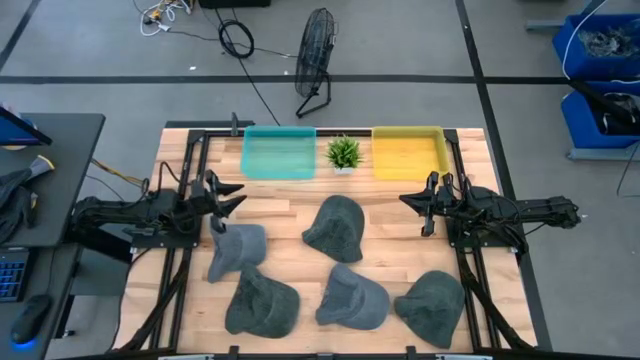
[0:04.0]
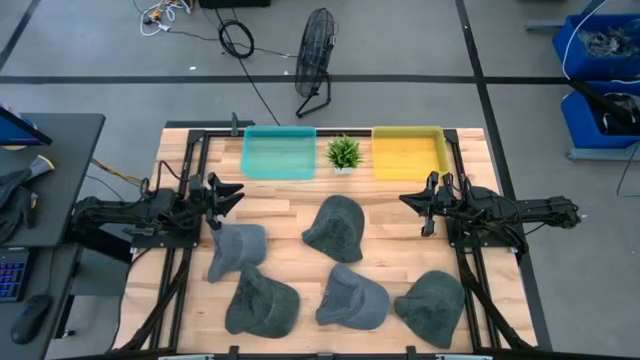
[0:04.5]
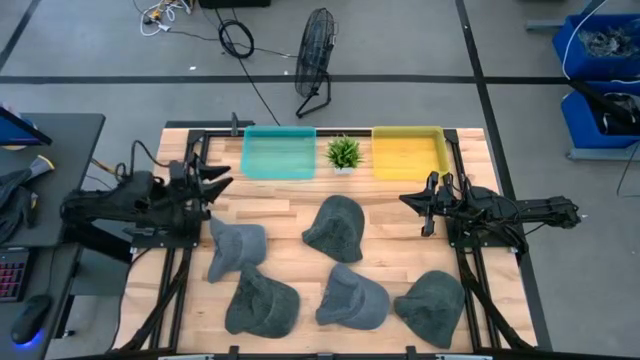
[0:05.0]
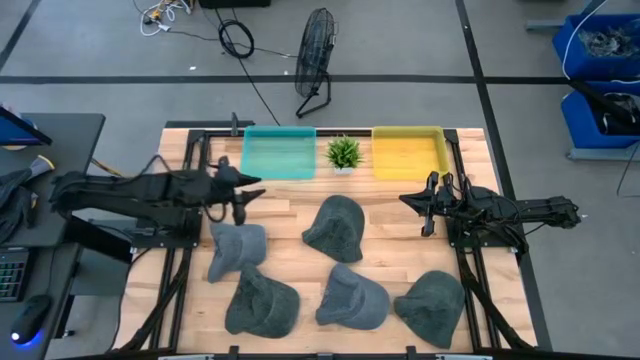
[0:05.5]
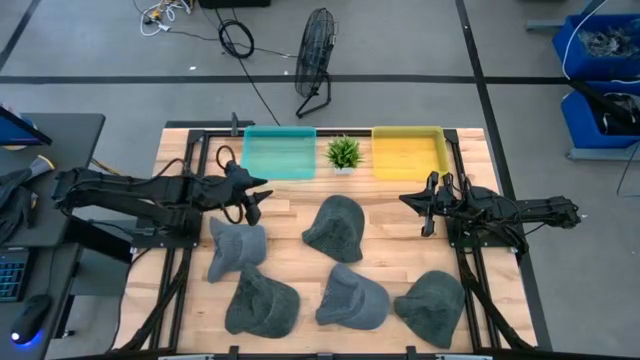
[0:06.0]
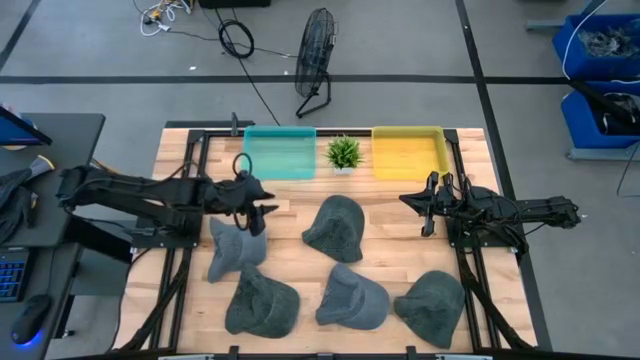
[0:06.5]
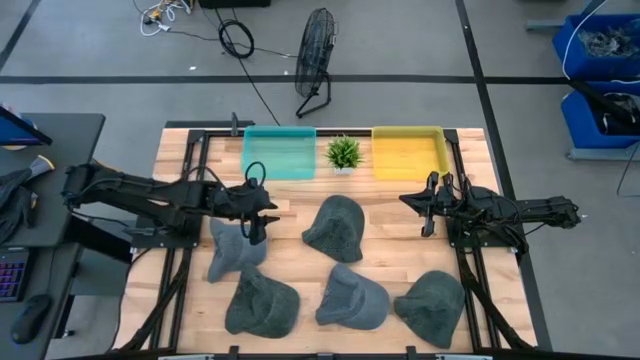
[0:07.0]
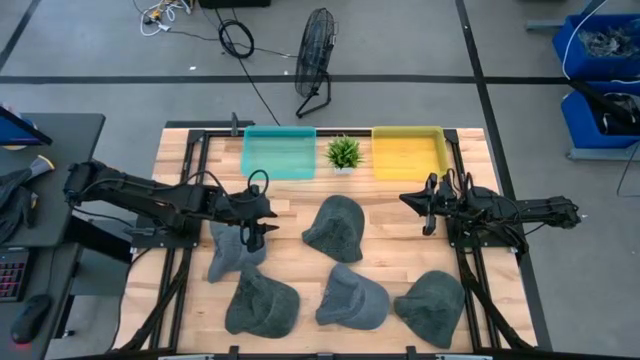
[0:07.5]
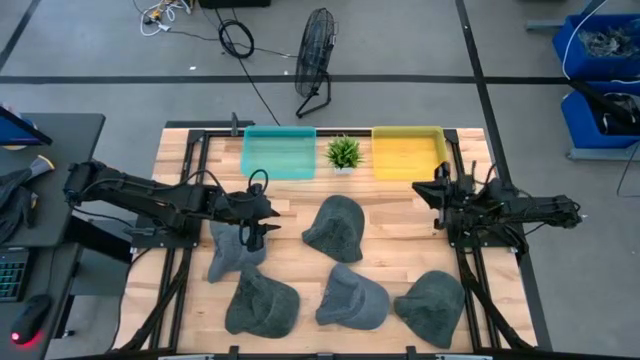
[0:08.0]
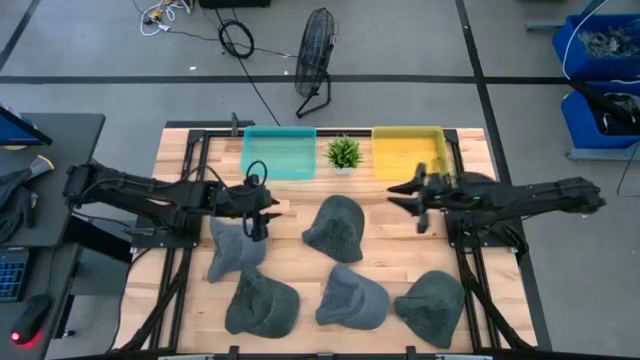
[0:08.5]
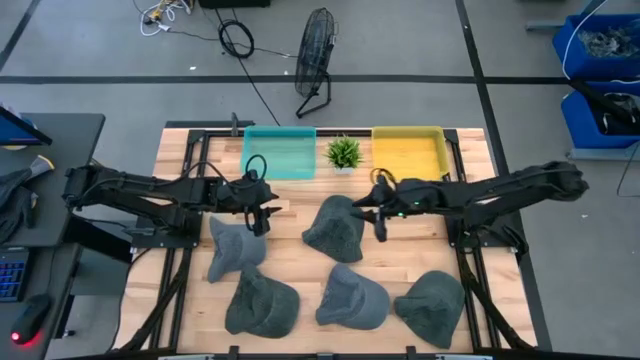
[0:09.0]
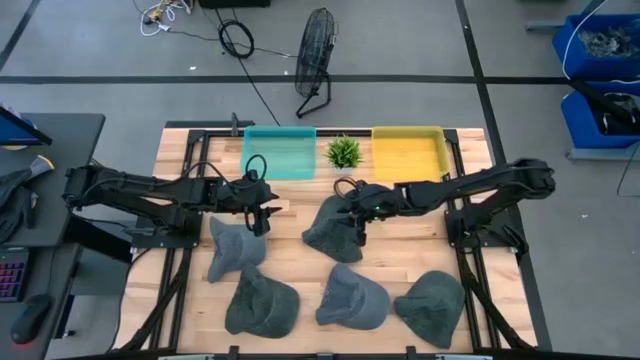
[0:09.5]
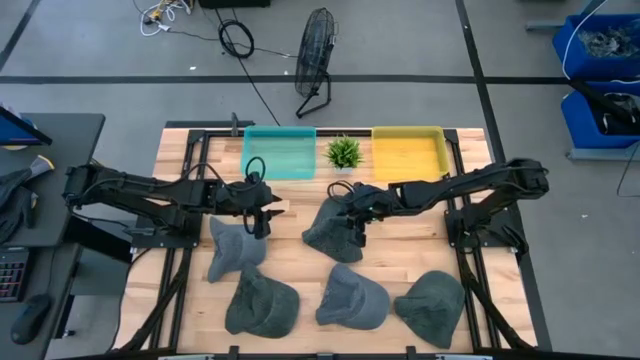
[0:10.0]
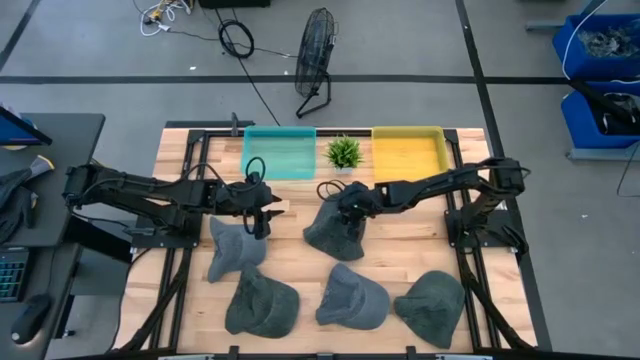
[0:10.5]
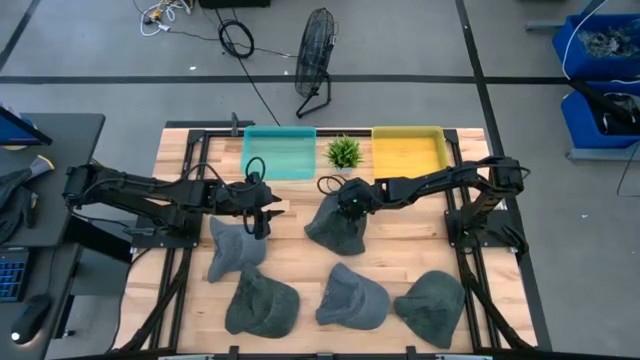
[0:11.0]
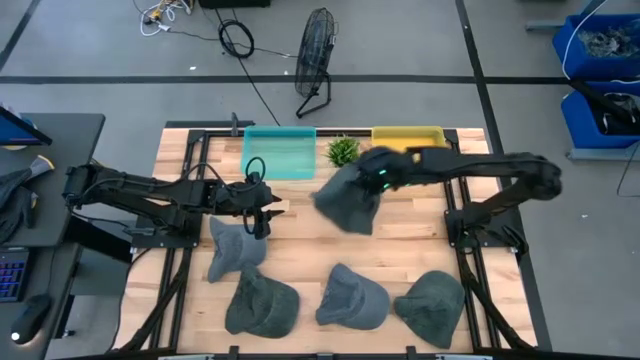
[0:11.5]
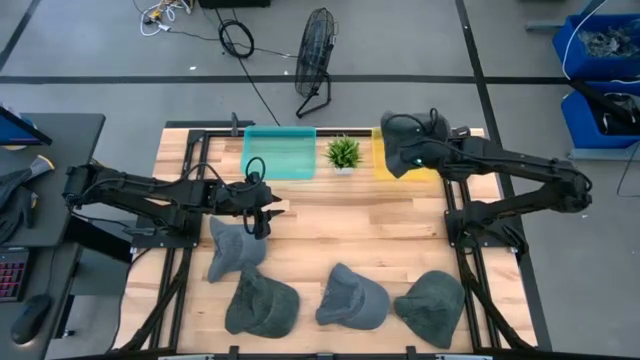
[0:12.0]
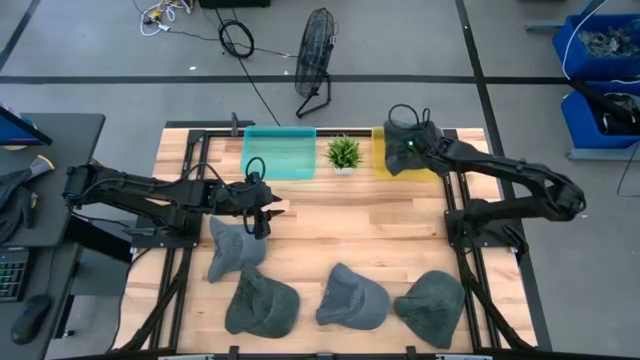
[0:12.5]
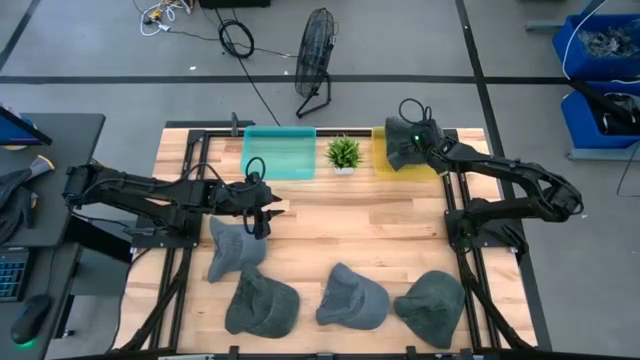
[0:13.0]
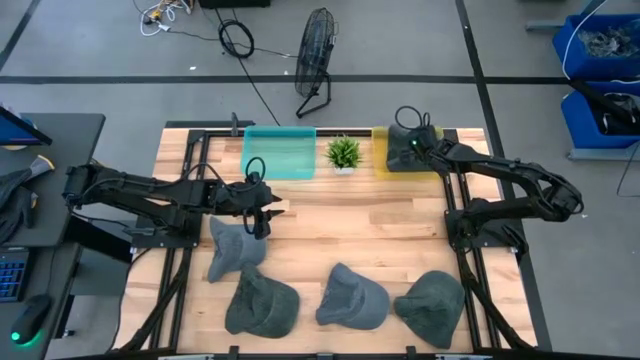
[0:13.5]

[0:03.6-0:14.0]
Task: Pick & Place hat
Put the top black cap into the yellow bin

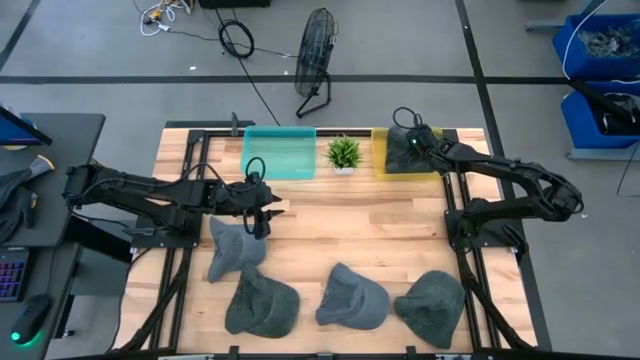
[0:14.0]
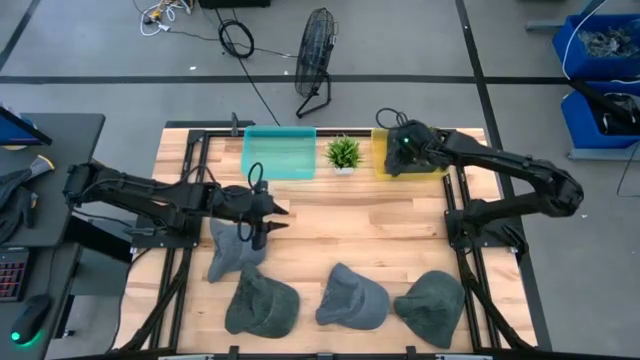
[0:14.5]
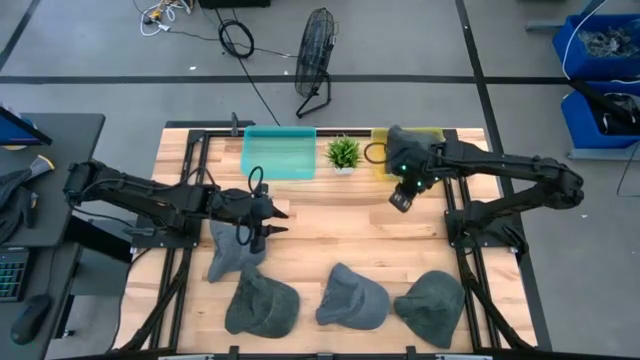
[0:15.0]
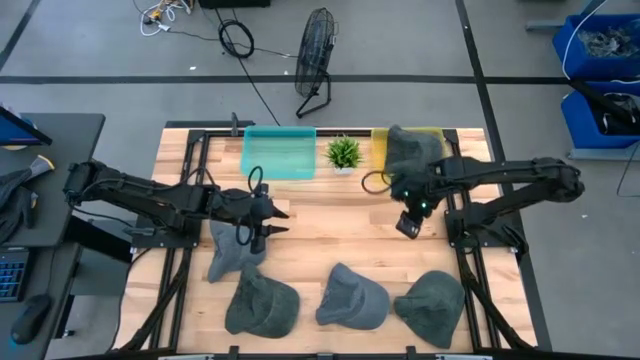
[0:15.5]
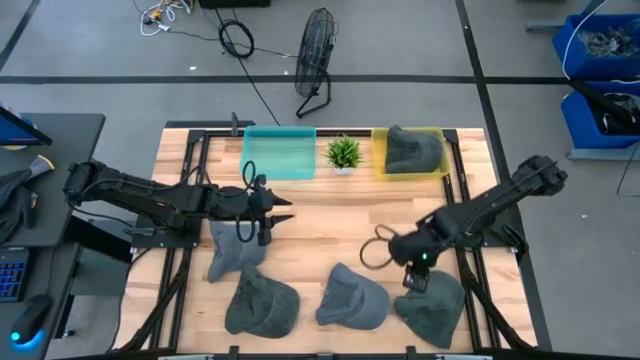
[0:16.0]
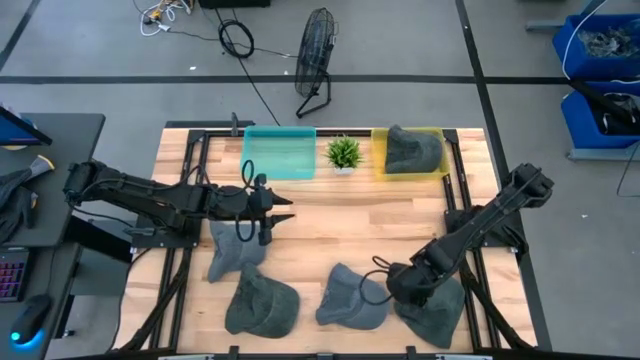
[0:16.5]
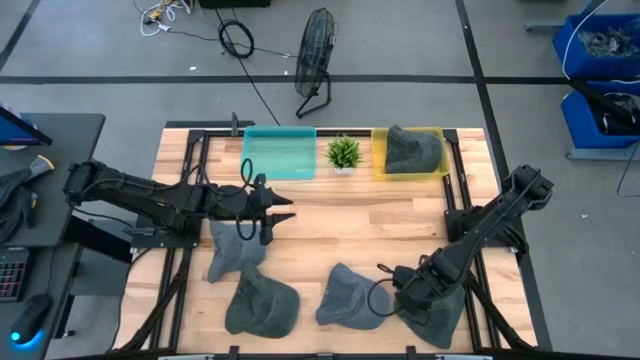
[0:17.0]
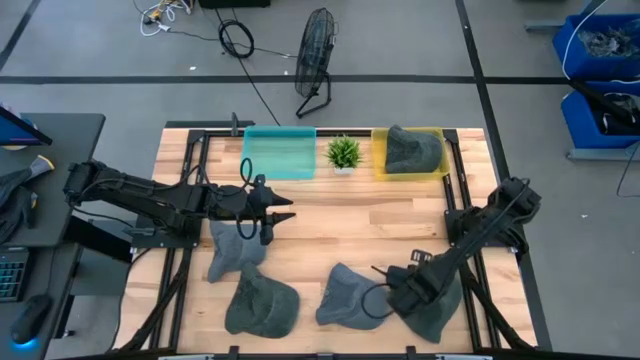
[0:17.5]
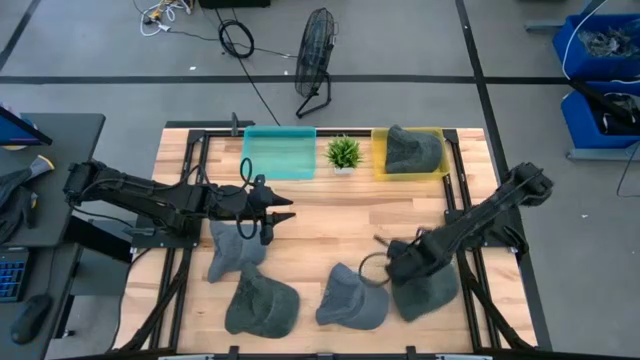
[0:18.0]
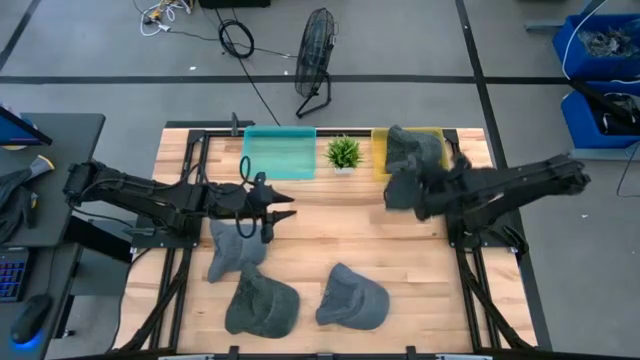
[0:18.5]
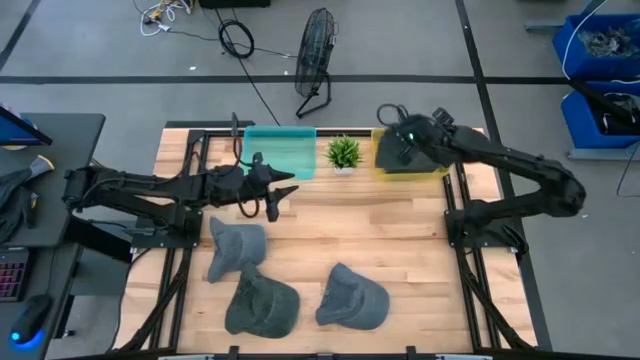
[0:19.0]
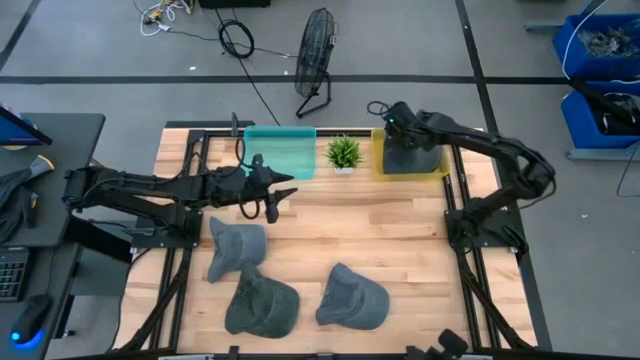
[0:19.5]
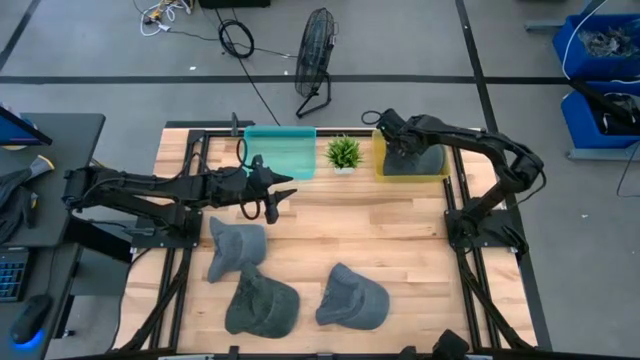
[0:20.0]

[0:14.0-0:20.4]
Put the right black cap into the yellow bin

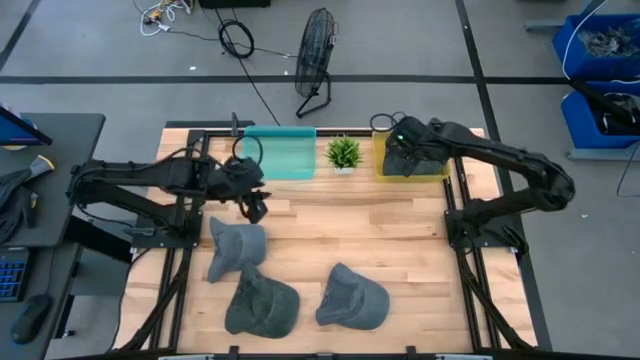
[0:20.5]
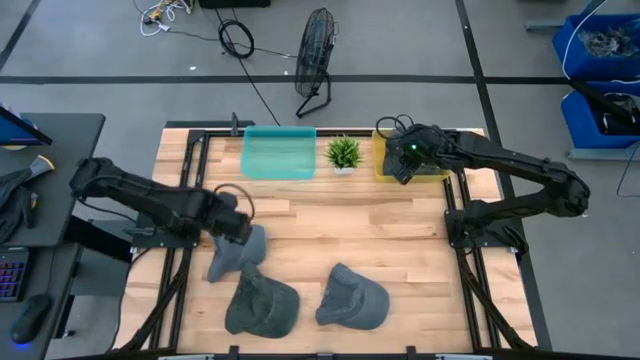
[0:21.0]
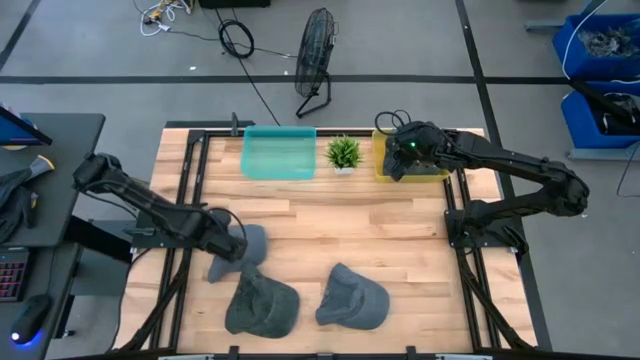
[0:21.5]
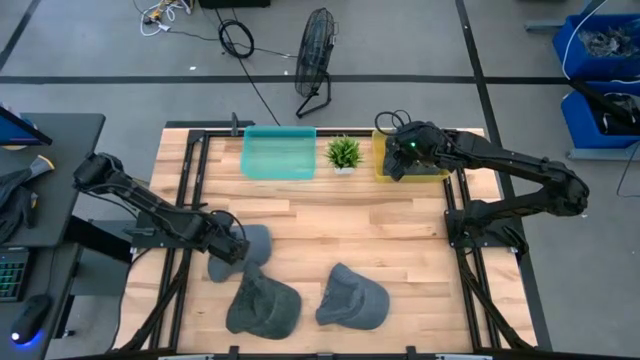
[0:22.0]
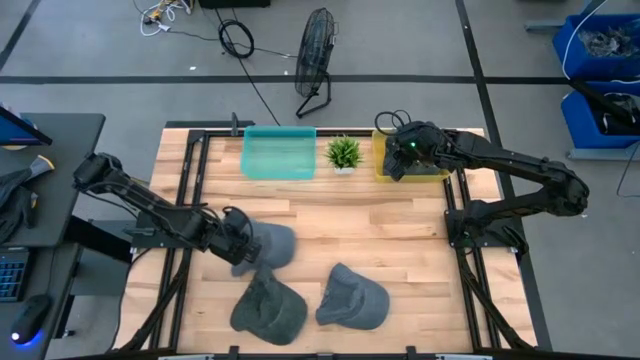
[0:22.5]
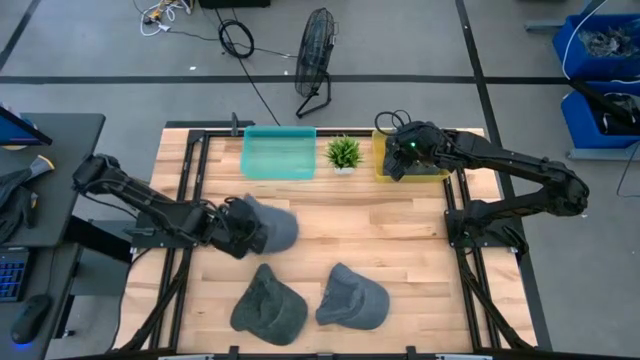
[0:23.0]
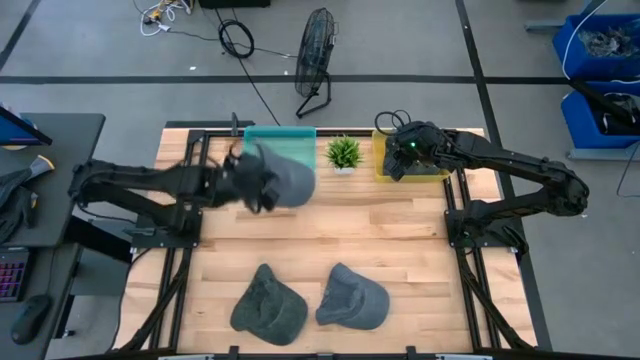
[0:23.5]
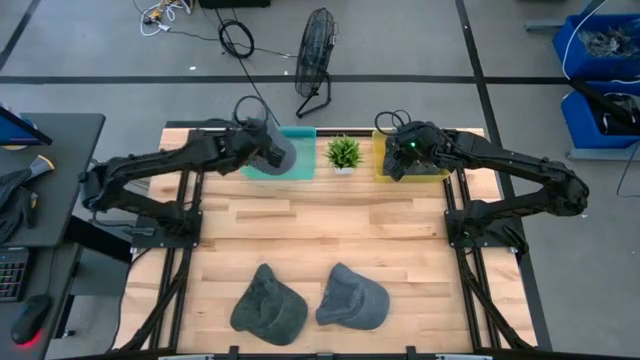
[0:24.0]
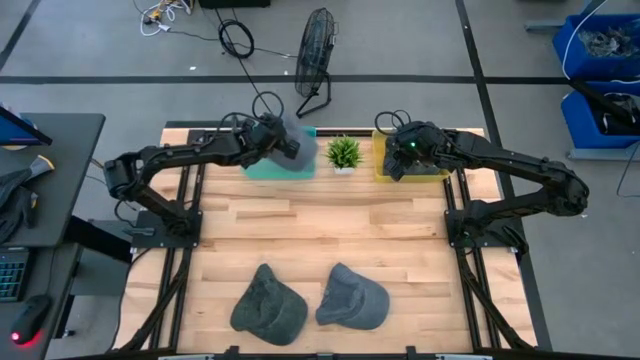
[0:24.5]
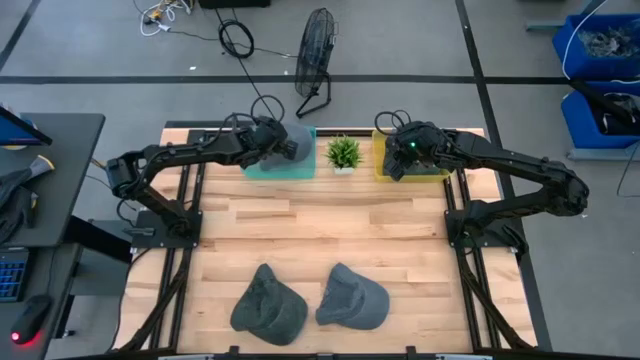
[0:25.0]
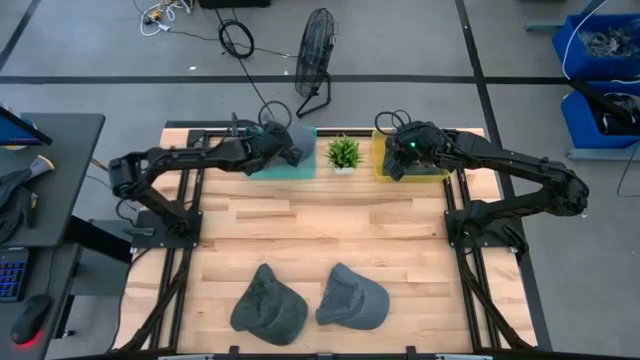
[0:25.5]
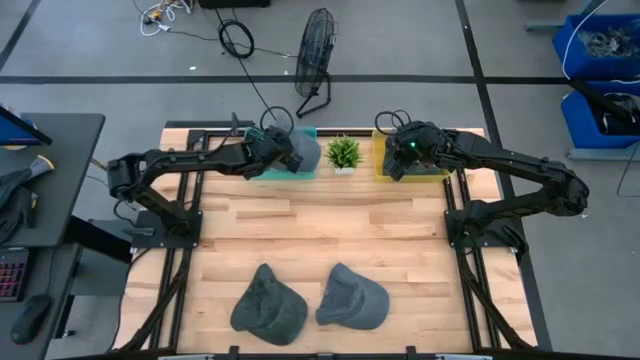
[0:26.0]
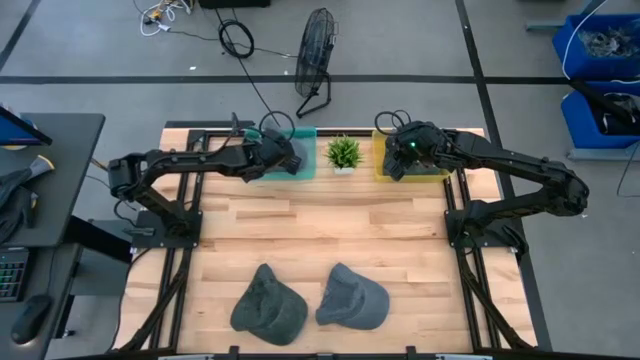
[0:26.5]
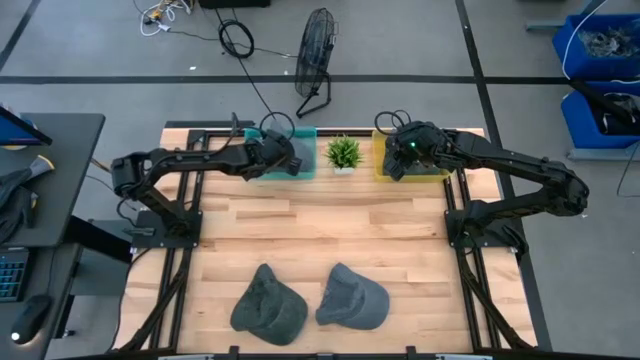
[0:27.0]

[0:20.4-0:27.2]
Put the left blue cap into the blue bin
